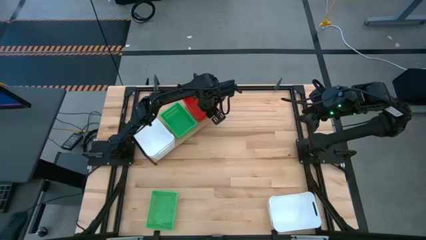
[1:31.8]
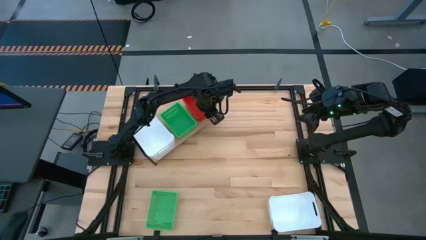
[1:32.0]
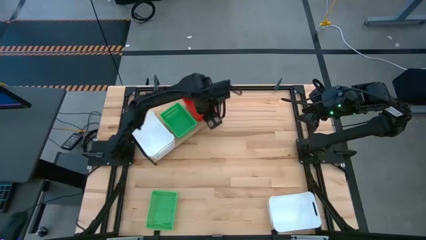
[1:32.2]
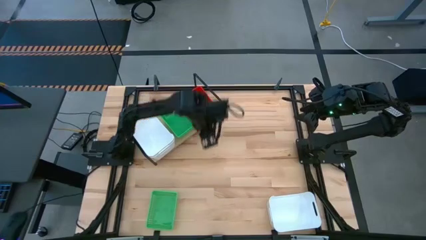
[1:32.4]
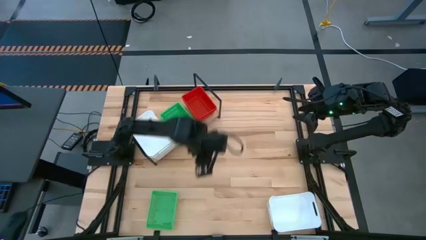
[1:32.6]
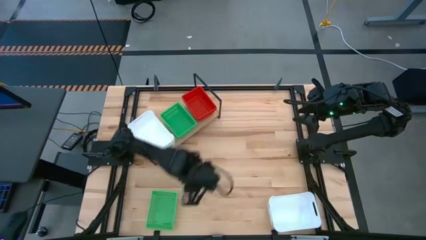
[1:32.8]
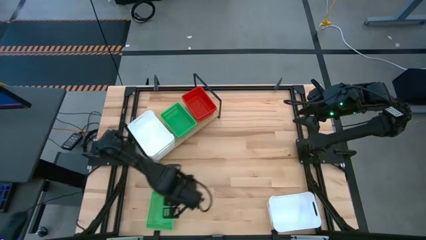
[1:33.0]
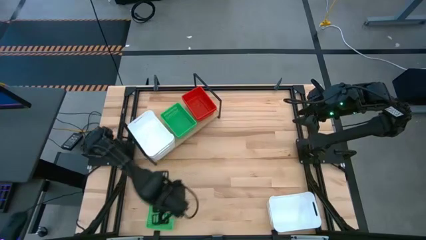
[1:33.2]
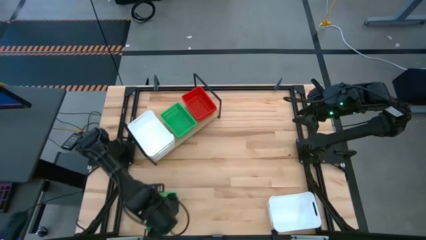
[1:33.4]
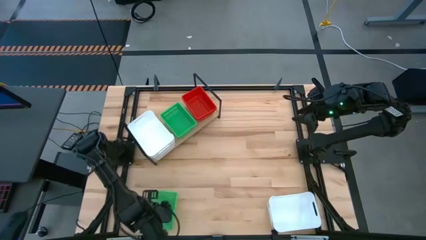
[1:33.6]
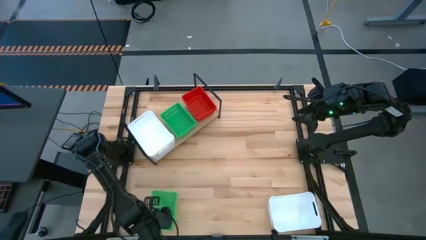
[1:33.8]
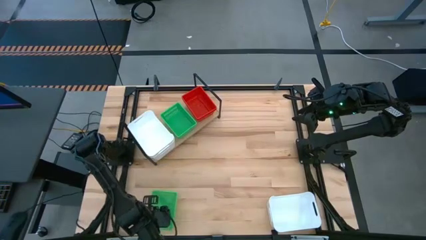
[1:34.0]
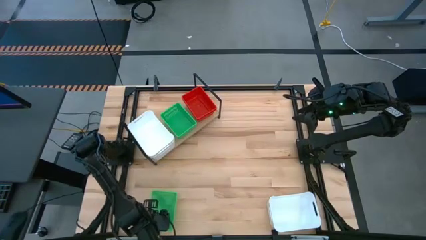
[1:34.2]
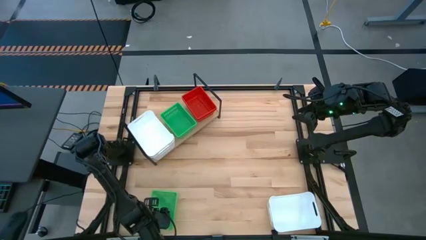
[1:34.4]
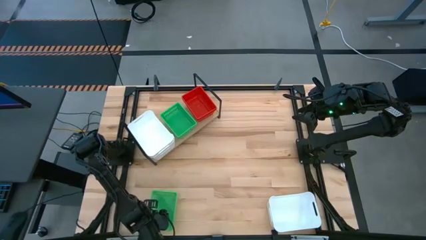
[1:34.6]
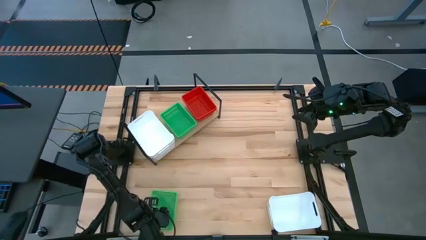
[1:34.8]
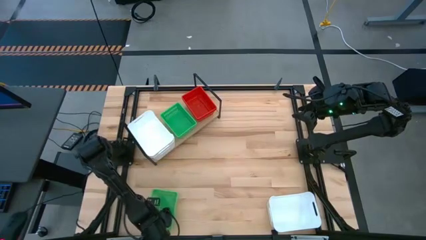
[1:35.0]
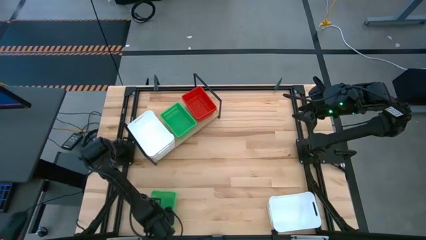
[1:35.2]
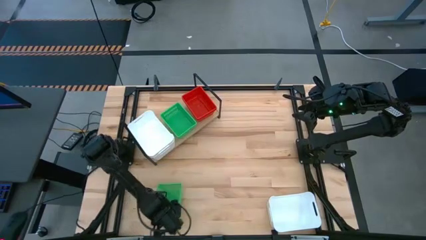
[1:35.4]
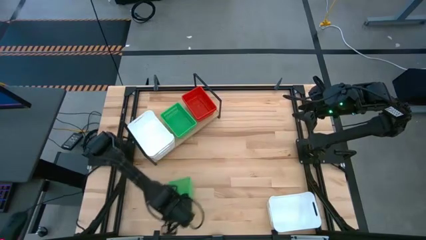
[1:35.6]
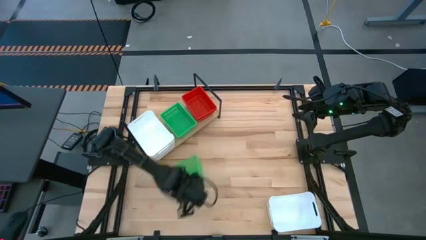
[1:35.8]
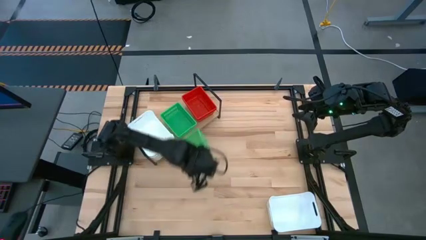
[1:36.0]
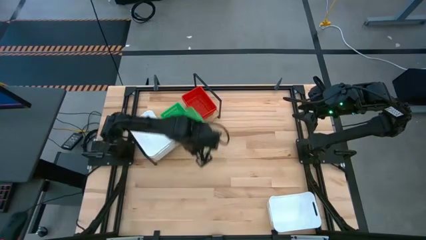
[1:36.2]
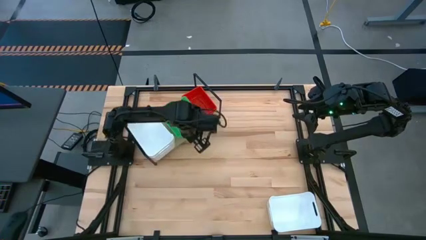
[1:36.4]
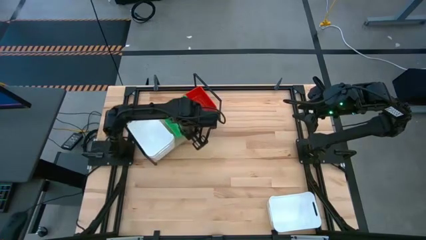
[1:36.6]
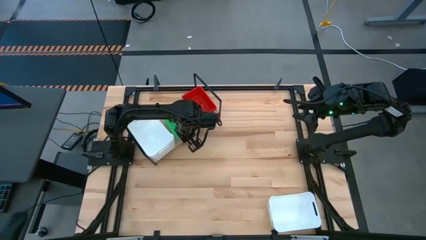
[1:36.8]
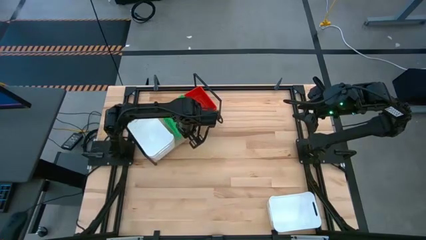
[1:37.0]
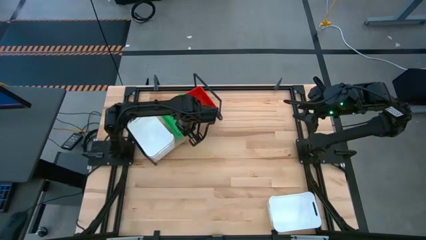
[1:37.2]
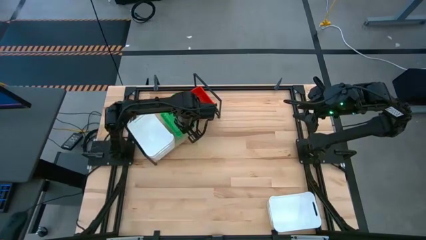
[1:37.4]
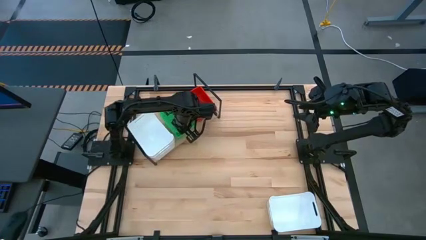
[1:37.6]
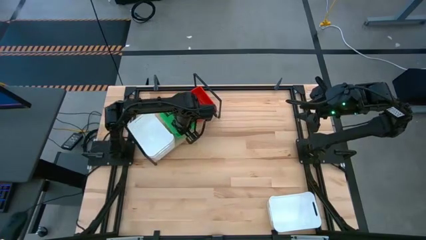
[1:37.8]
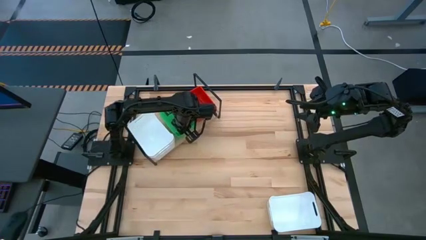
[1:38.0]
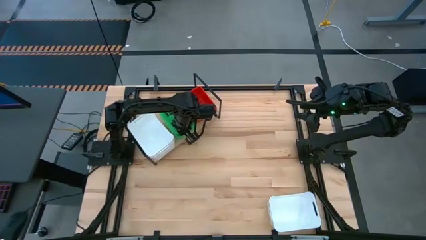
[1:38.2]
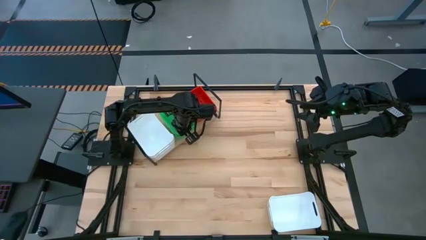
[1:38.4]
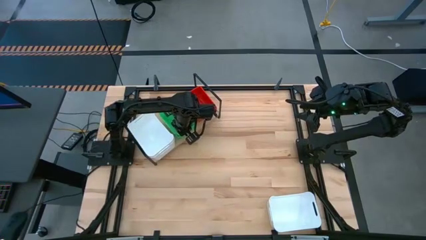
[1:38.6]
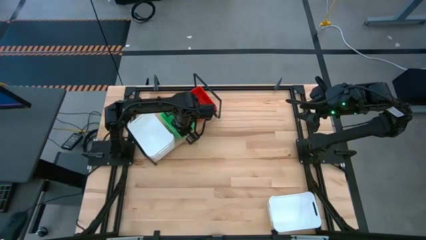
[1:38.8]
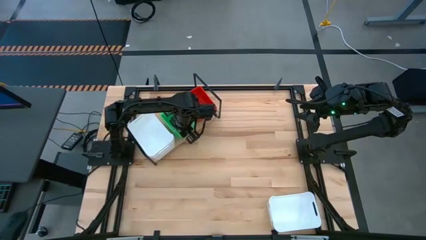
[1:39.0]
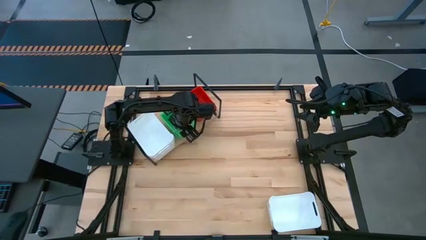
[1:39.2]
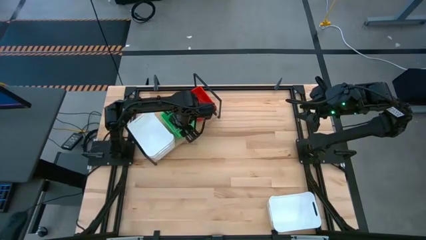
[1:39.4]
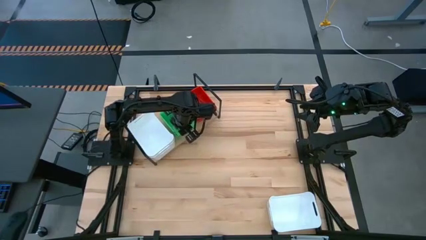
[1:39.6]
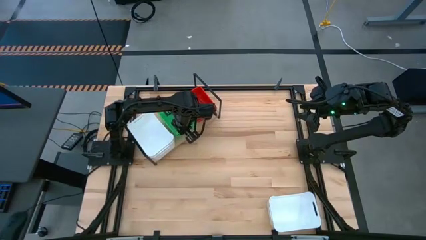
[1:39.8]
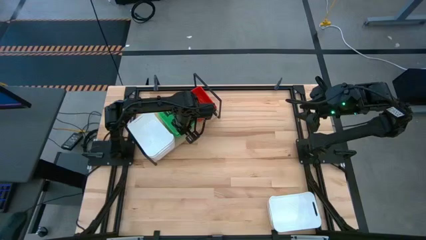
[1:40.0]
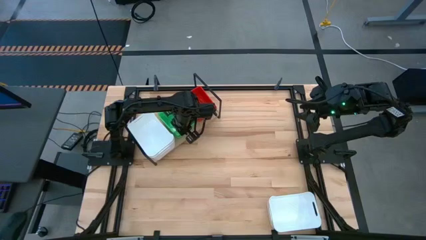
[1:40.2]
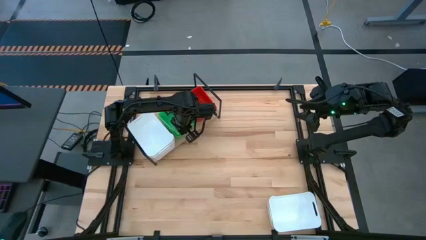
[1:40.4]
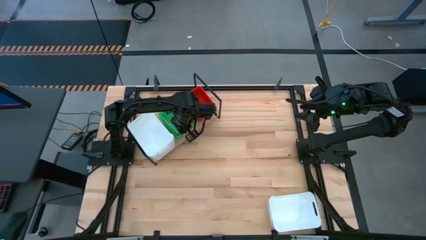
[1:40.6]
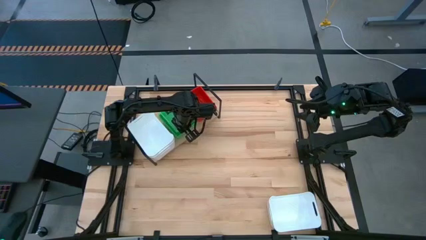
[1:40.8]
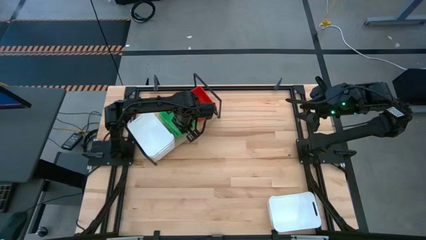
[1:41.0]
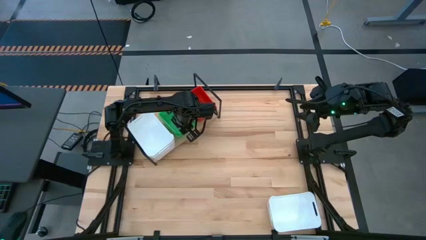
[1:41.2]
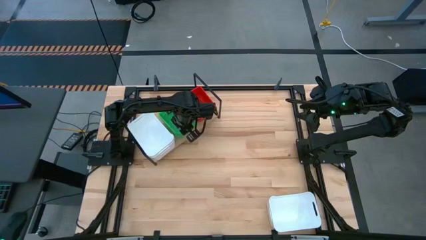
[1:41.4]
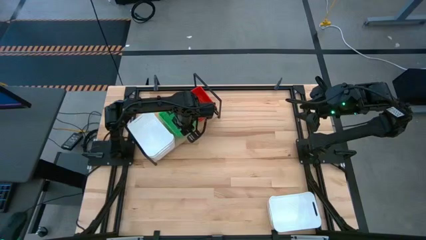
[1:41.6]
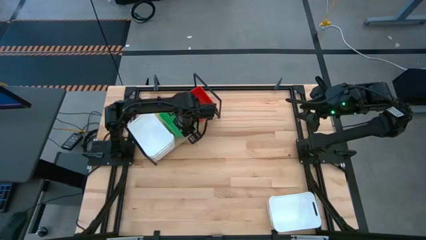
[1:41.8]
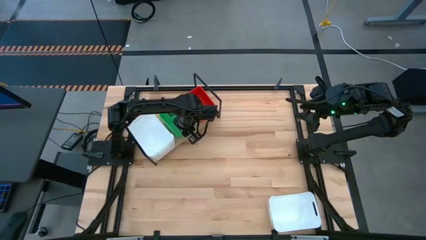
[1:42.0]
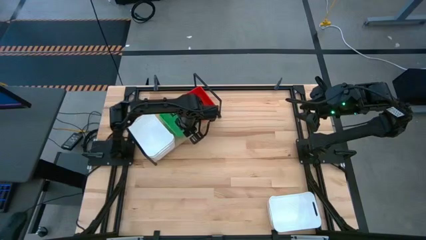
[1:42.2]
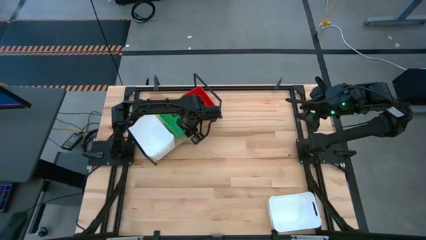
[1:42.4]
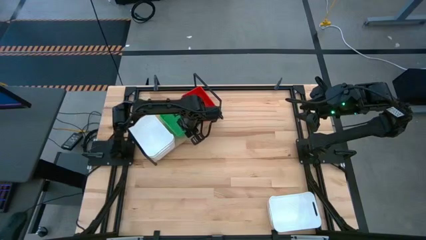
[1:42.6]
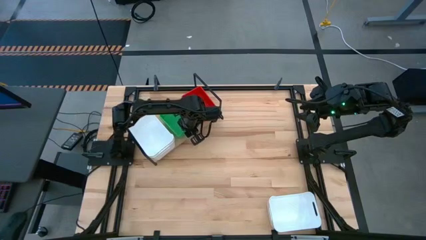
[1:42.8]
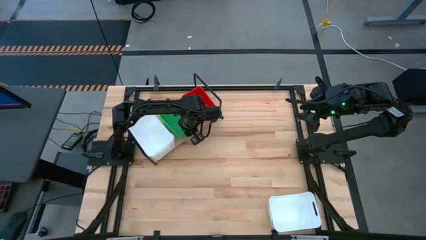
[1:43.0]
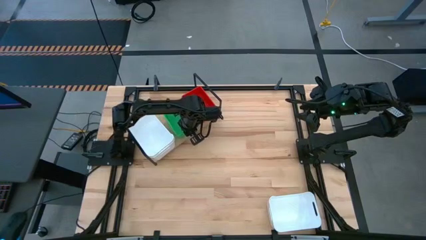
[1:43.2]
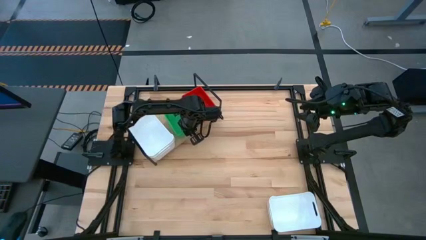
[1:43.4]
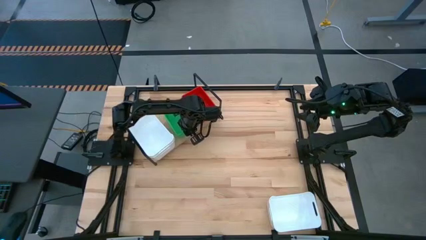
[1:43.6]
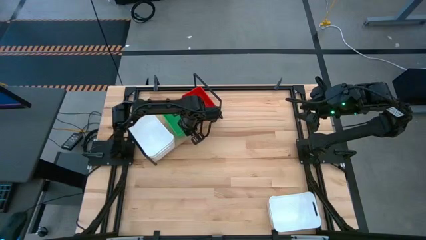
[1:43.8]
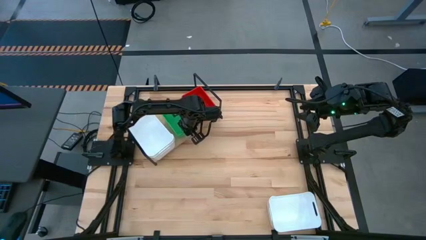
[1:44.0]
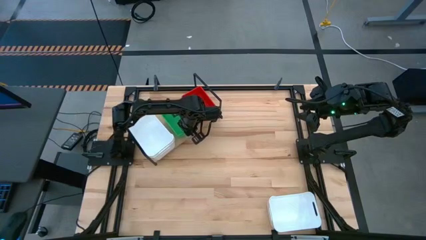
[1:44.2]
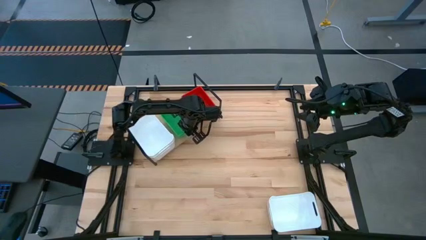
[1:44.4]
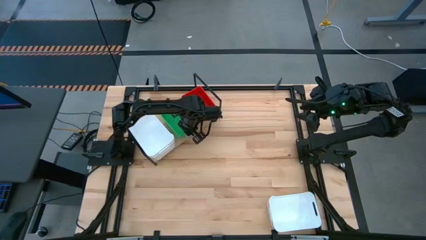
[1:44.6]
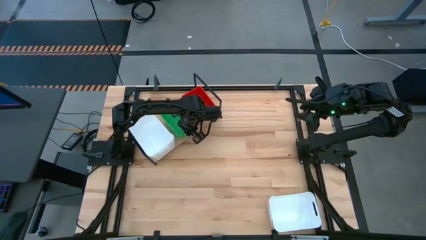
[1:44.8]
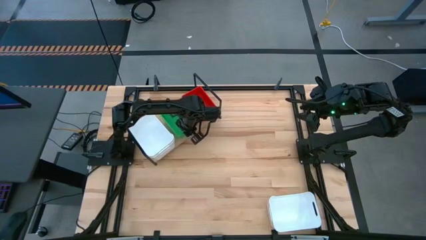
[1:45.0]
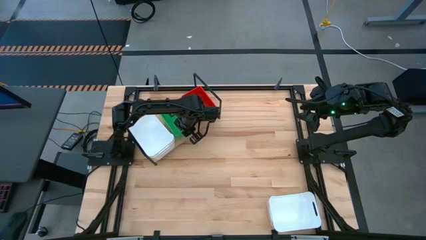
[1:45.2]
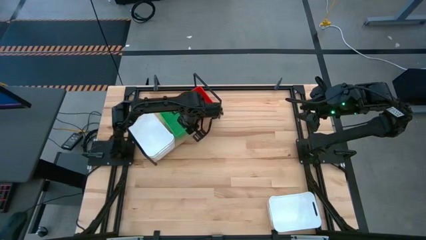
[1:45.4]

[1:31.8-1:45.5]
Task: Stack baskets on shelf by color
Stack the green bin on top of the green bin on the shelf
